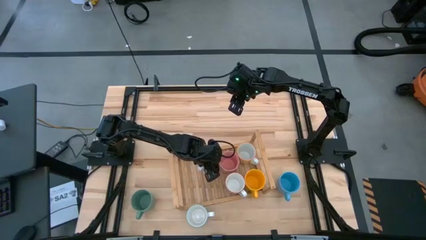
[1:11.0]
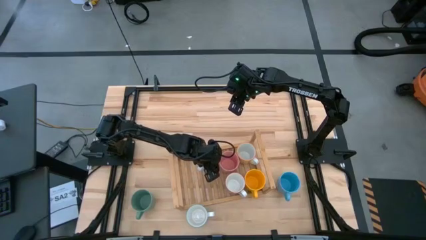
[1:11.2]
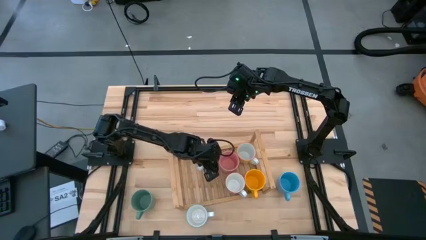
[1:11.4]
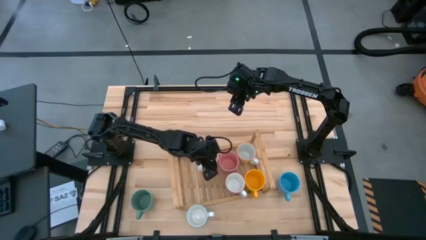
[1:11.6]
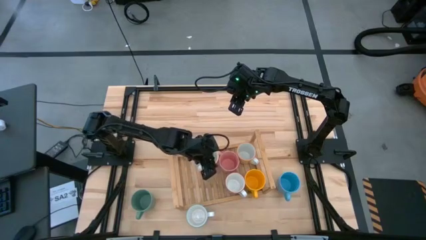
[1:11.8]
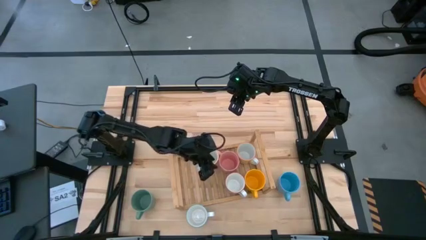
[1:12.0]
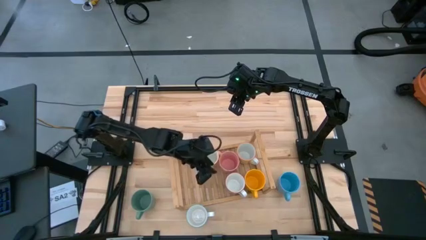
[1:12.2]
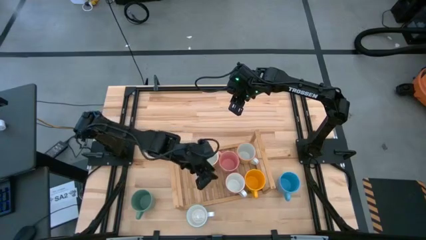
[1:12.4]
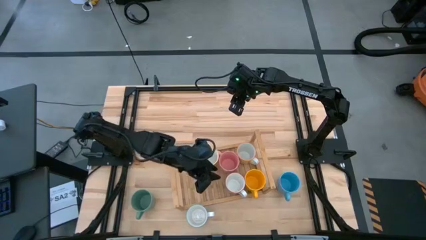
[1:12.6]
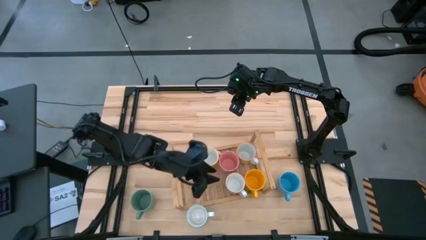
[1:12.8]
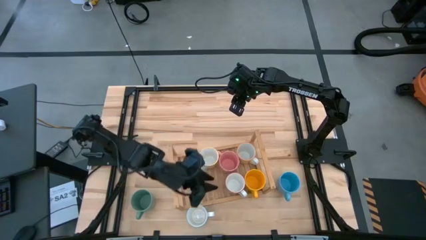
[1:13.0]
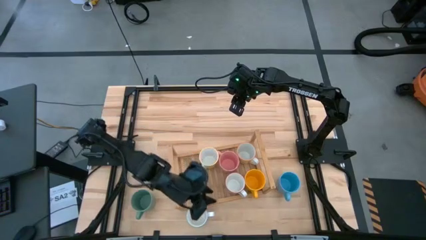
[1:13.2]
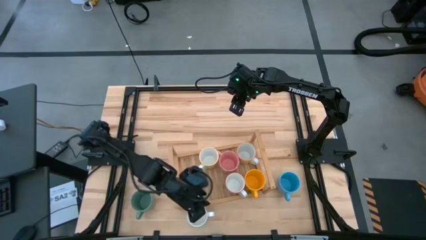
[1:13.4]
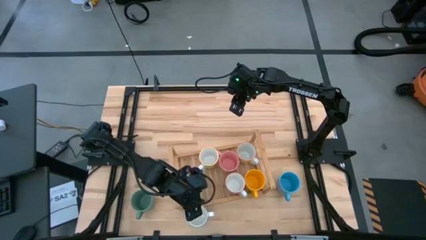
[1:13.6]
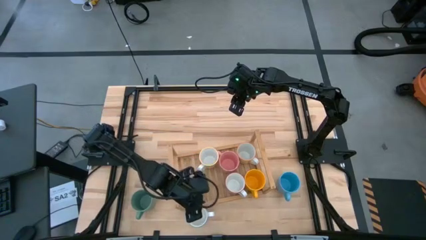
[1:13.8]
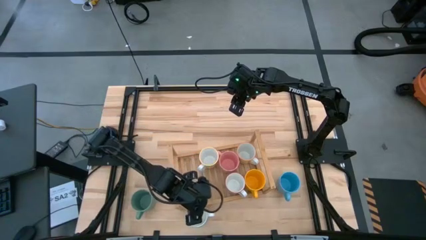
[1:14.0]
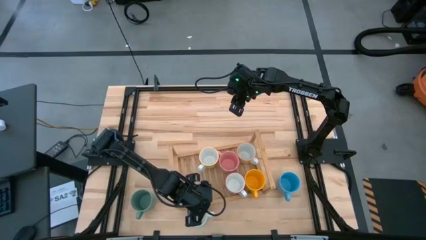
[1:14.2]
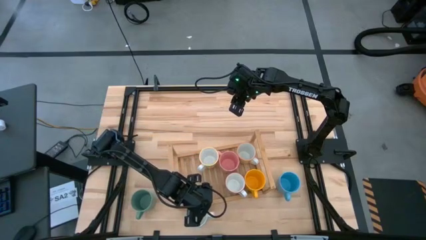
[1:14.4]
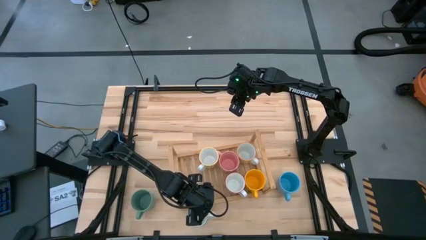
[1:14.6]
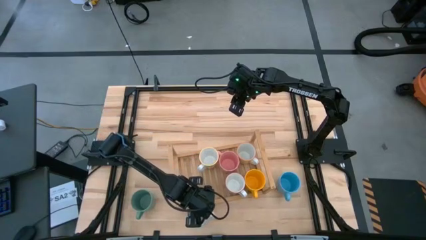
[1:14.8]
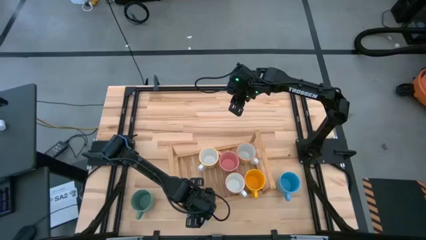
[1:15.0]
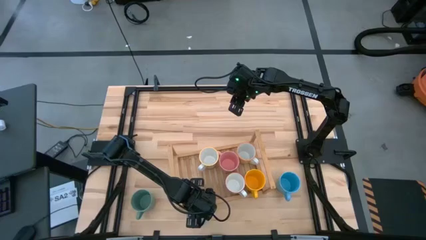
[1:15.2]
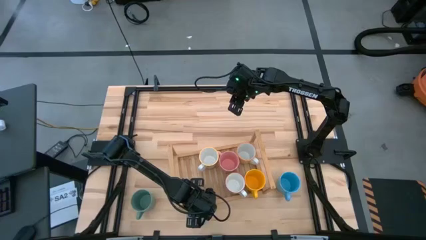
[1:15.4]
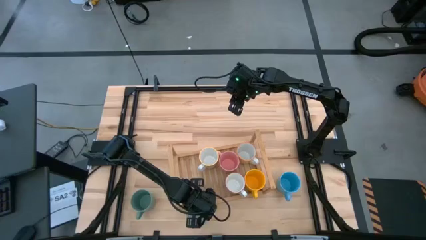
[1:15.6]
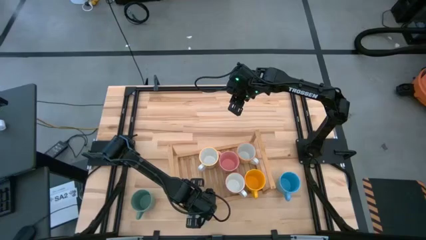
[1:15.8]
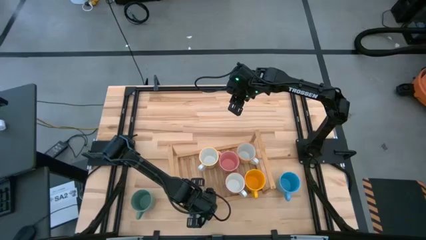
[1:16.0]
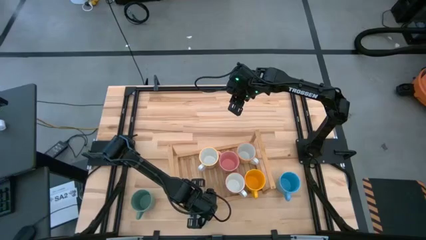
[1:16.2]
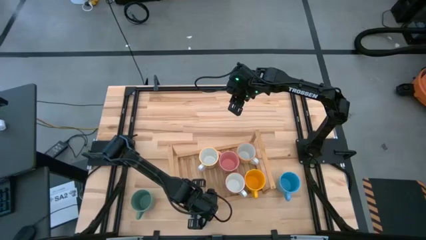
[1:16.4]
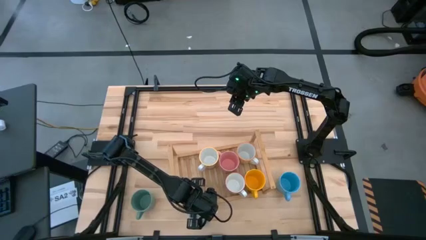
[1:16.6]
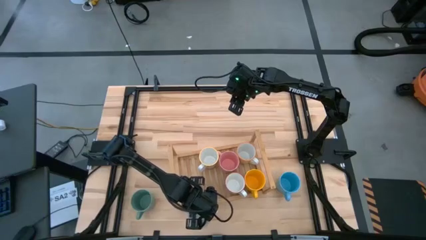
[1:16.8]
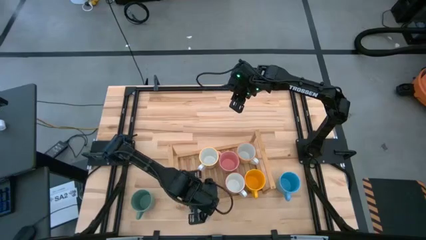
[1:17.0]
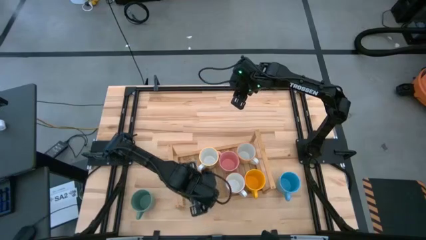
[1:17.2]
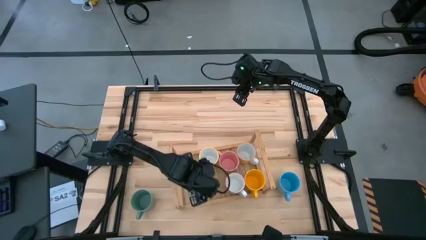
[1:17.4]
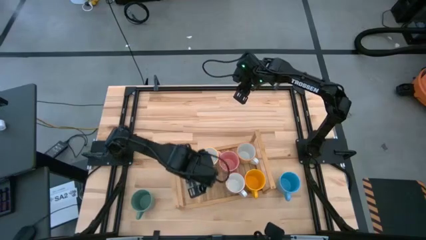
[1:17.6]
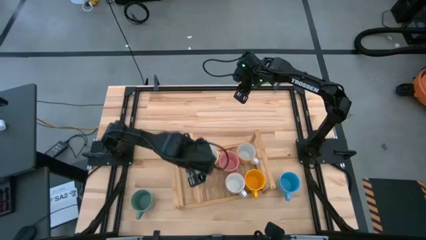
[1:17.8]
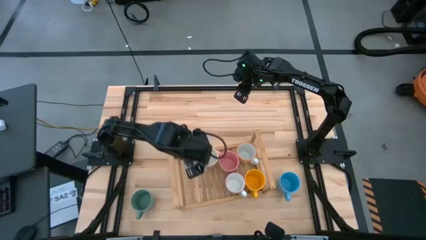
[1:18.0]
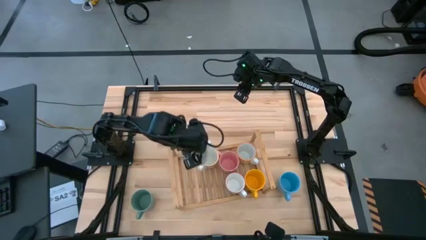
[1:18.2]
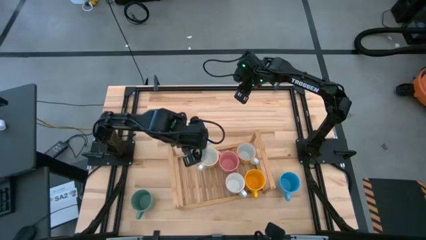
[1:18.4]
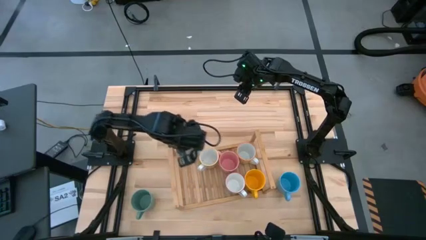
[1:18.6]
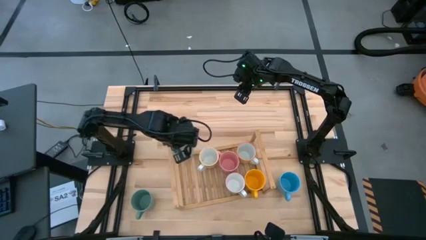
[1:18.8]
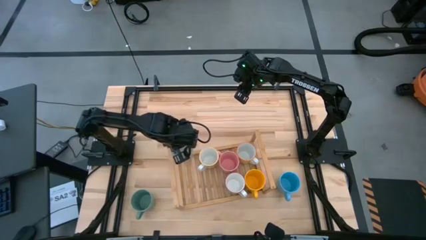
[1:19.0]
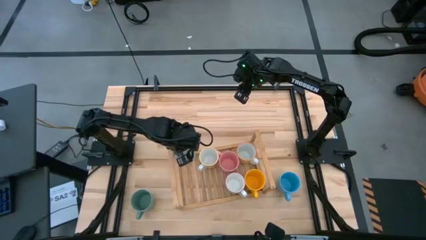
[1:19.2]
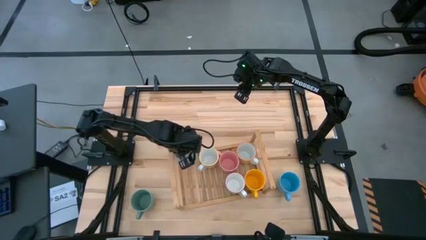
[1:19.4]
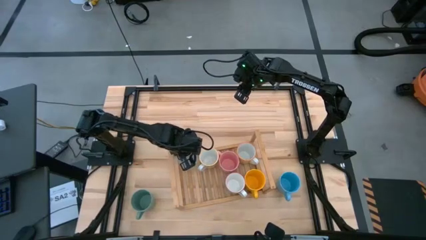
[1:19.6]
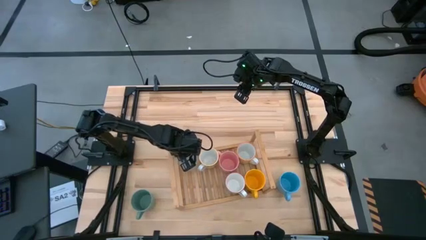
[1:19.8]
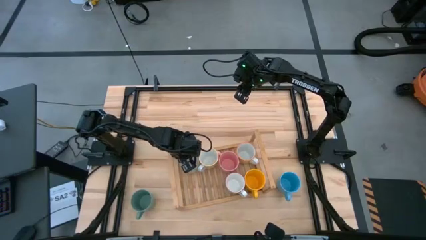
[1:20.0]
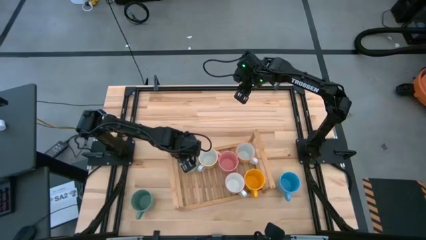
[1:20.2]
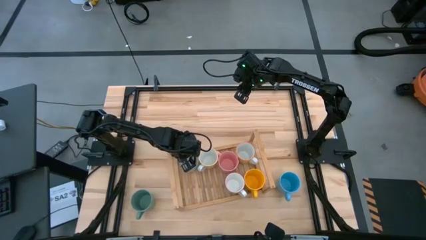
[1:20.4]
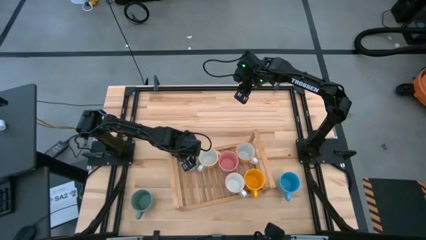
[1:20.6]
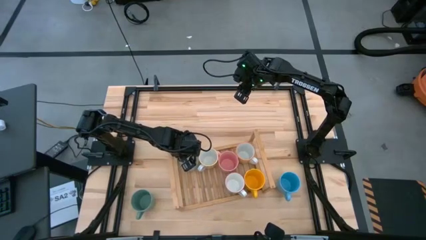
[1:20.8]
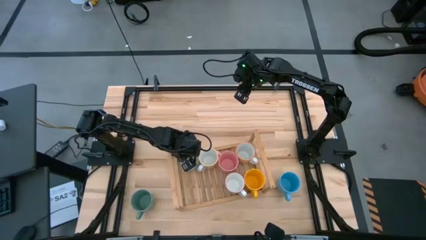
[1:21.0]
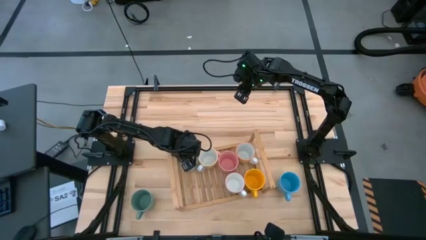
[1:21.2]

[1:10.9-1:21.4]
Task: Place coffee mugs
Put the white-blue patterned mug on the shelf

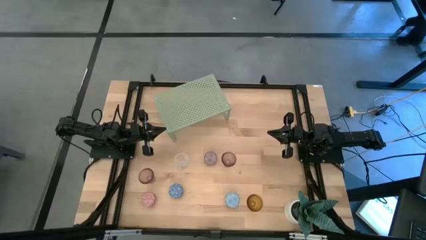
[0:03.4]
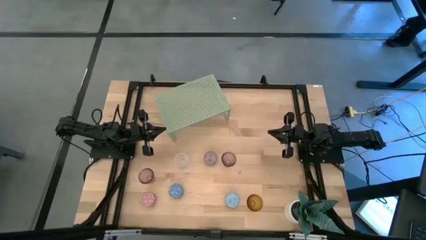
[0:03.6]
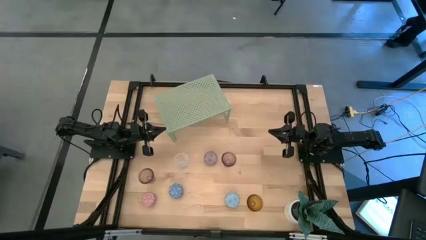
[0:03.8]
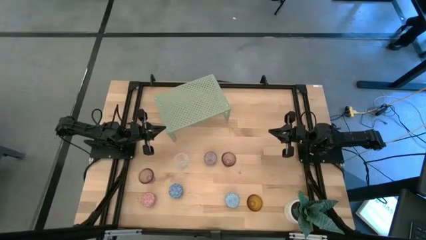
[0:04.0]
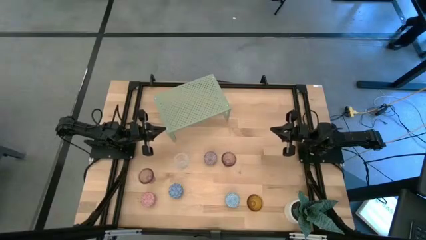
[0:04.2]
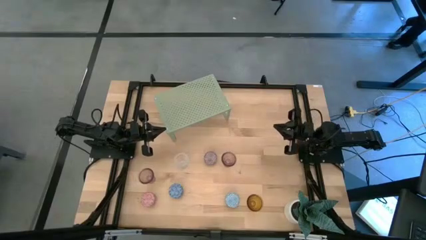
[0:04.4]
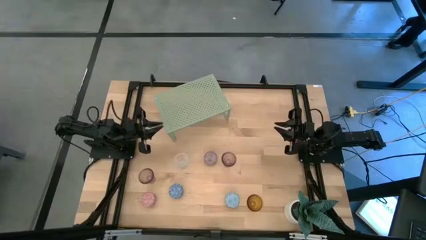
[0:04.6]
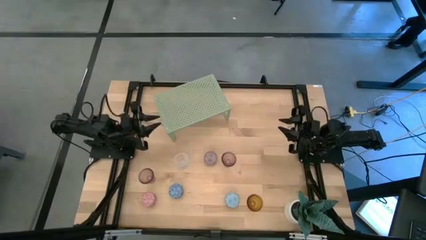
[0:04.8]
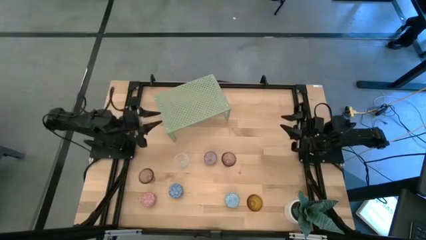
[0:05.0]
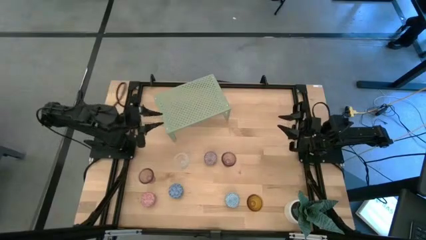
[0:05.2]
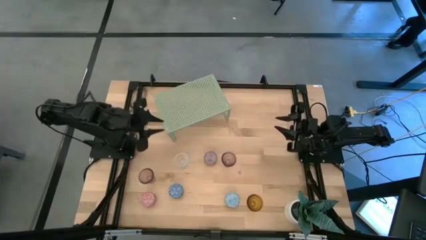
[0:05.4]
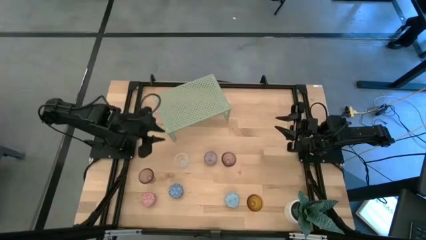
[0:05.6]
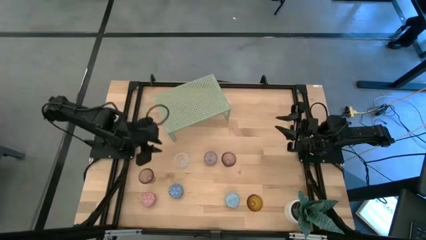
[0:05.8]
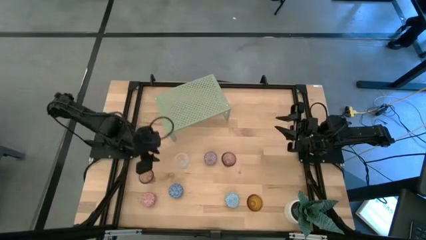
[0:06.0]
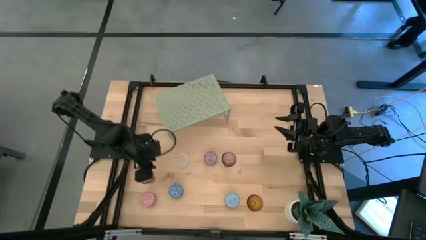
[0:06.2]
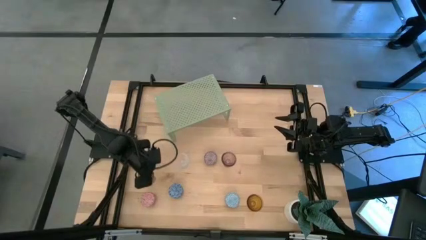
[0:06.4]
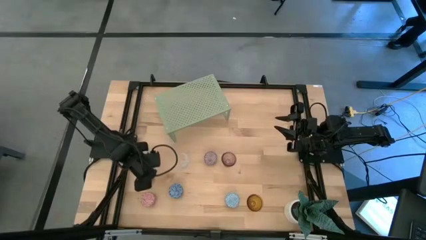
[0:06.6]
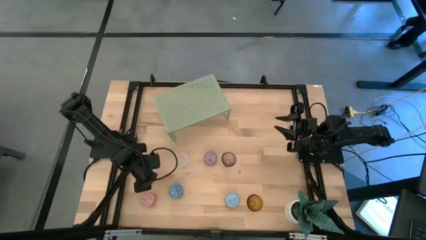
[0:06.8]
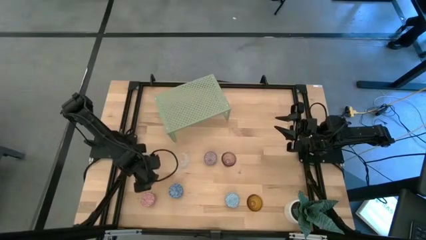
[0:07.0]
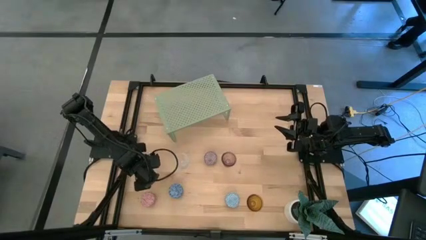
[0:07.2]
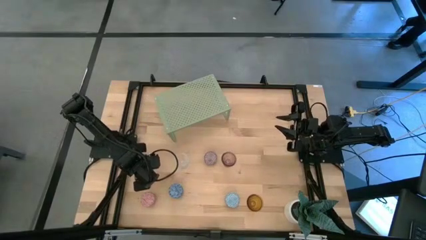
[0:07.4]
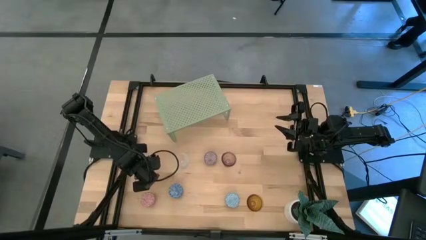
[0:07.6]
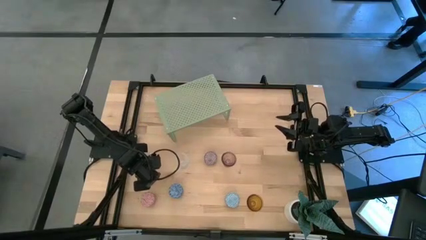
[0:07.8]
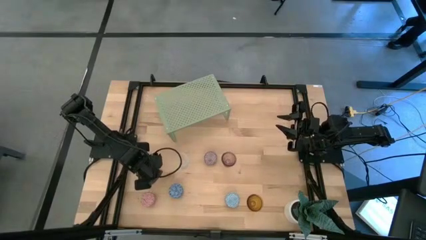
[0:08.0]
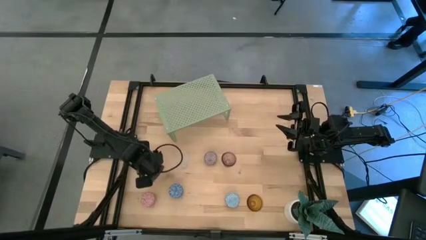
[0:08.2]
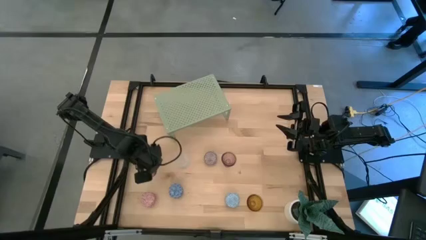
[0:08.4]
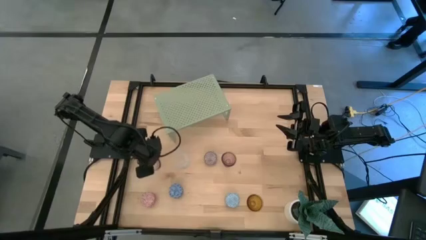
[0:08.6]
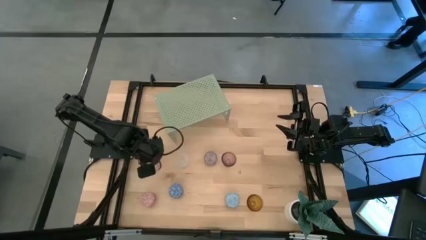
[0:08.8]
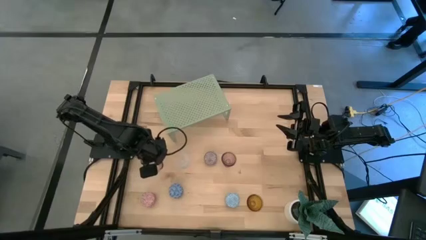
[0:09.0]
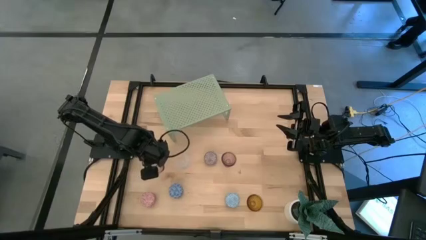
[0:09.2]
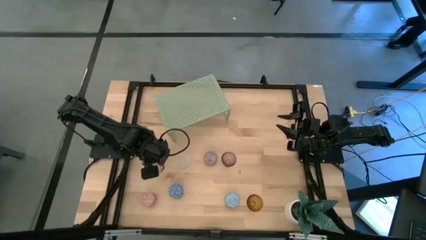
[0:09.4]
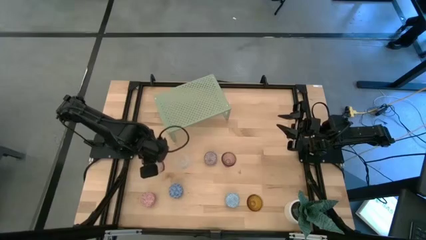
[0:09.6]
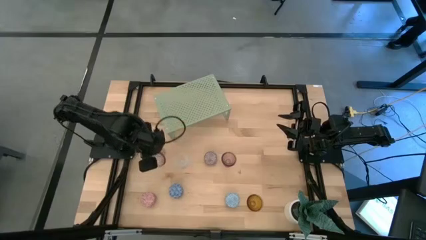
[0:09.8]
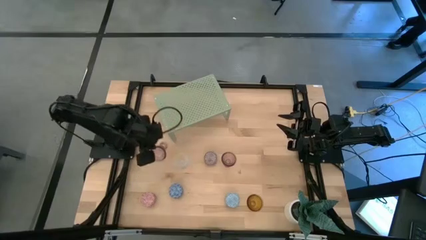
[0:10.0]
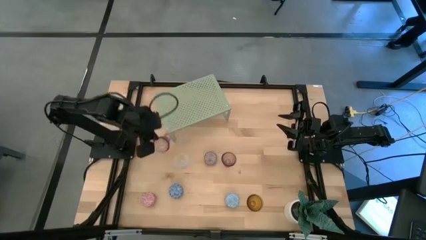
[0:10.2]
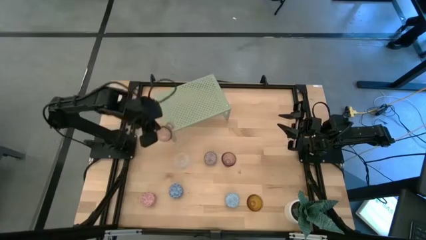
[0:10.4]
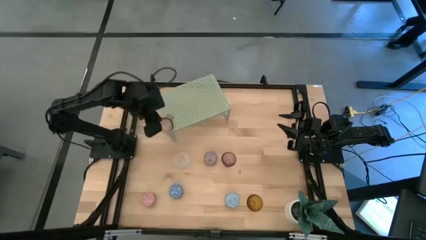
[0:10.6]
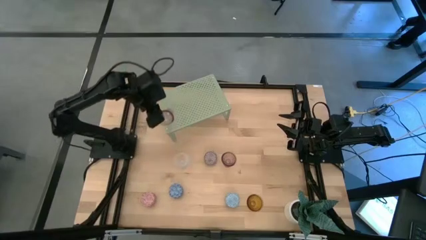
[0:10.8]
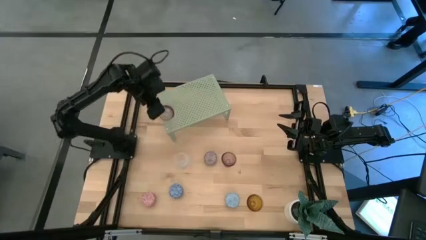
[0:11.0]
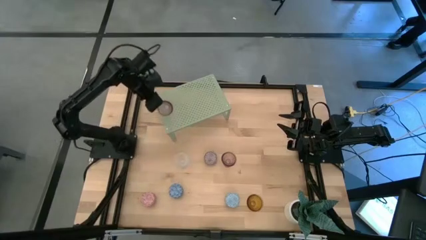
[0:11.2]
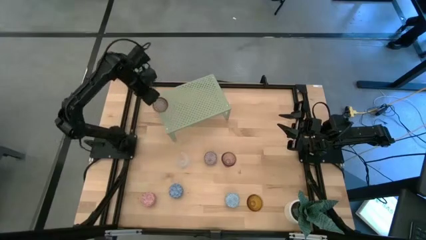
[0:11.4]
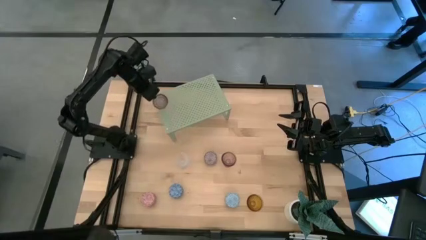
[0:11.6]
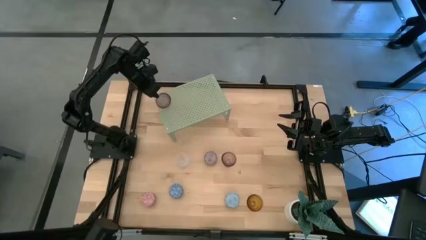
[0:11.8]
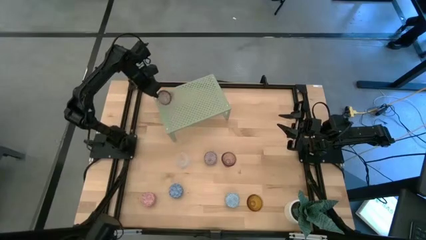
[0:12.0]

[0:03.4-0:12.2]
Task: Pick & Place candle stick holders
Put the left pink glass candle holder on the shelf
